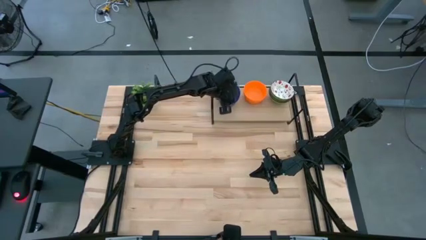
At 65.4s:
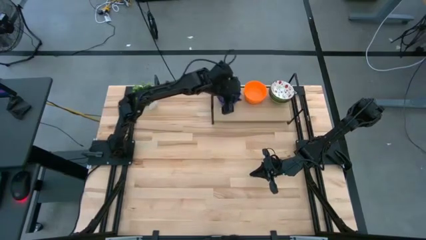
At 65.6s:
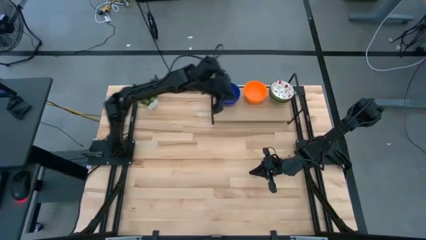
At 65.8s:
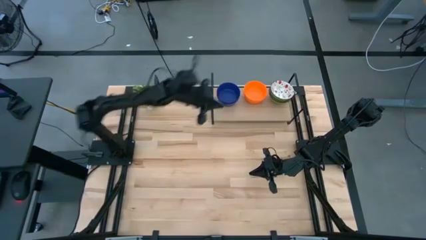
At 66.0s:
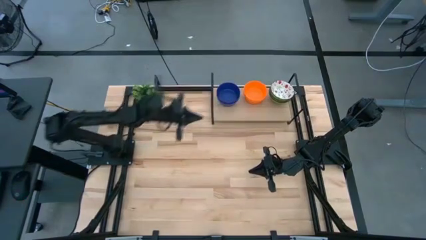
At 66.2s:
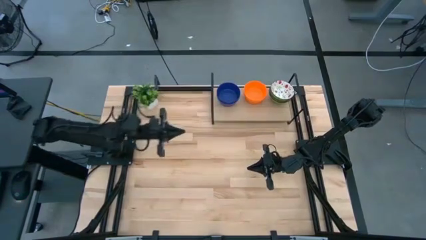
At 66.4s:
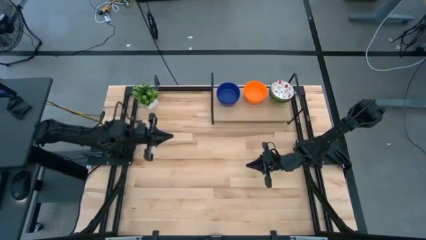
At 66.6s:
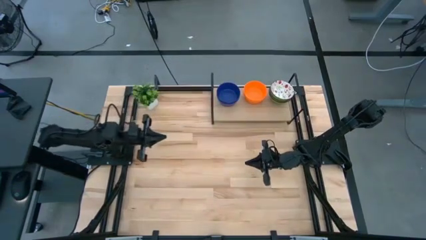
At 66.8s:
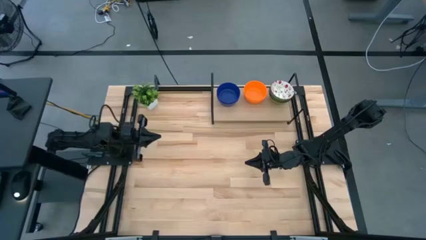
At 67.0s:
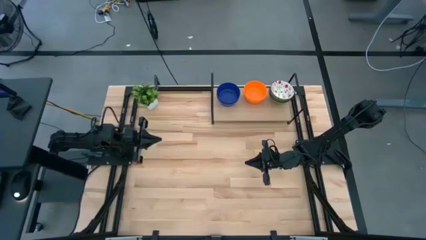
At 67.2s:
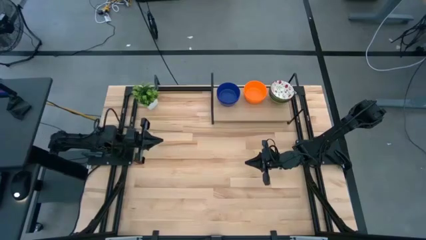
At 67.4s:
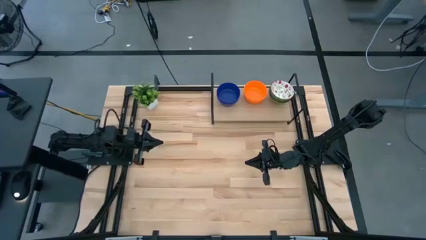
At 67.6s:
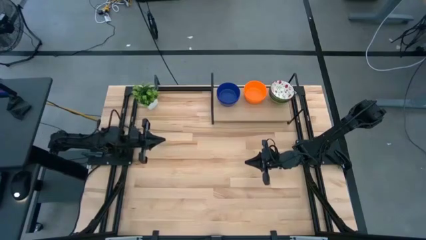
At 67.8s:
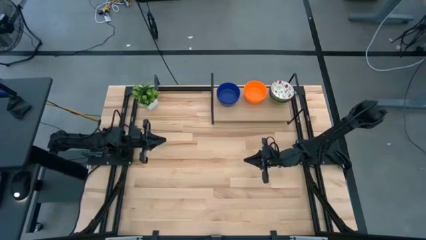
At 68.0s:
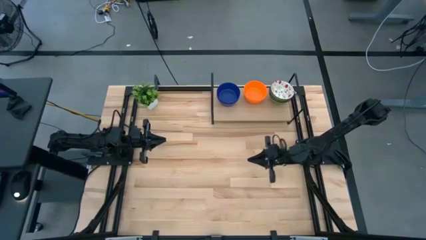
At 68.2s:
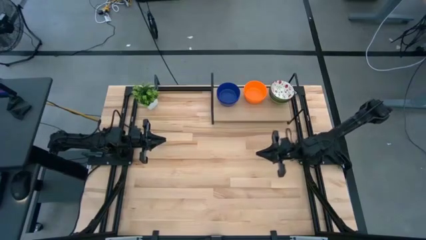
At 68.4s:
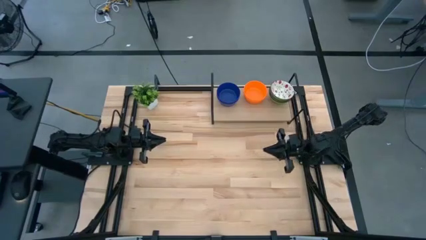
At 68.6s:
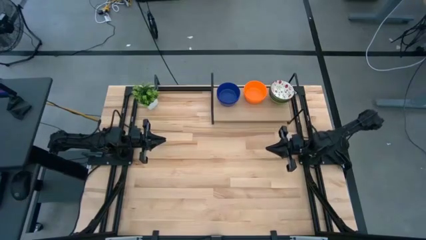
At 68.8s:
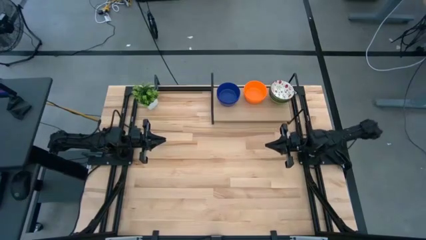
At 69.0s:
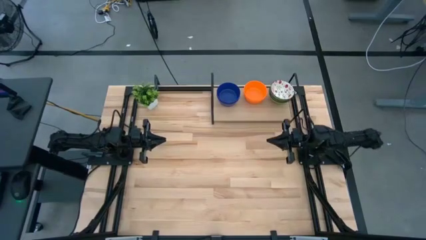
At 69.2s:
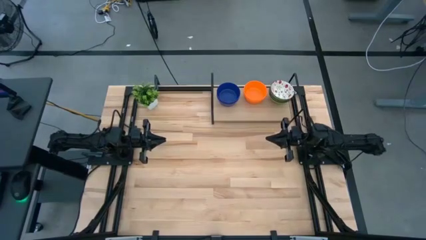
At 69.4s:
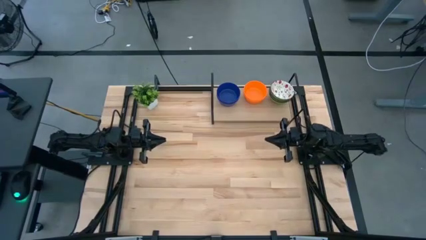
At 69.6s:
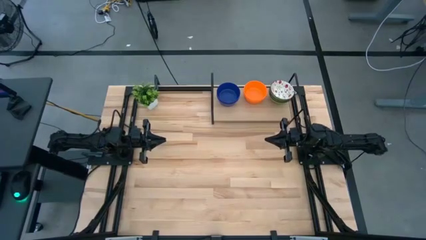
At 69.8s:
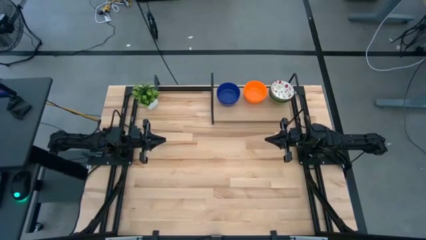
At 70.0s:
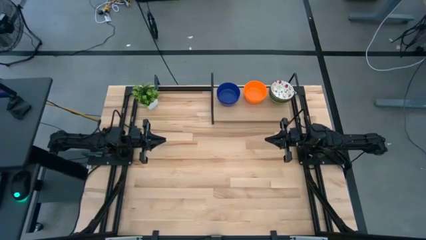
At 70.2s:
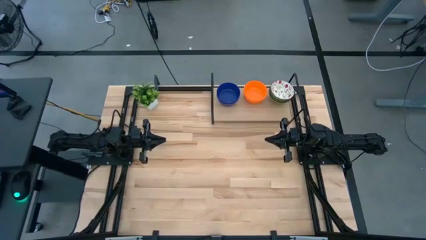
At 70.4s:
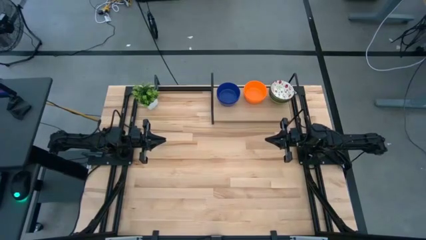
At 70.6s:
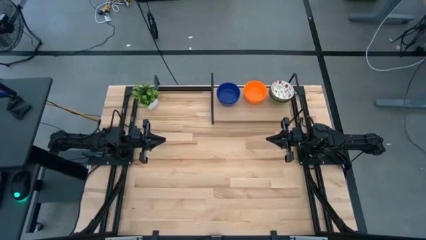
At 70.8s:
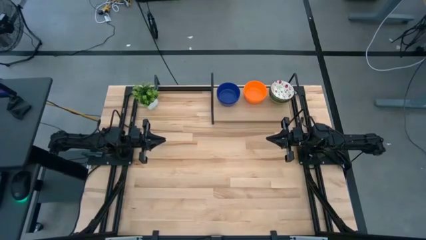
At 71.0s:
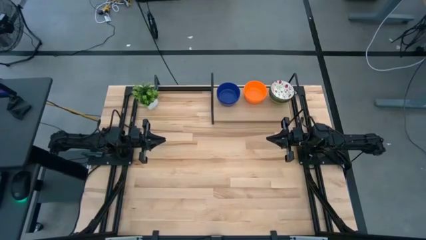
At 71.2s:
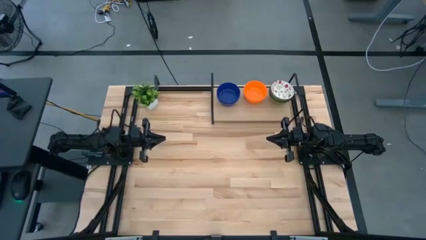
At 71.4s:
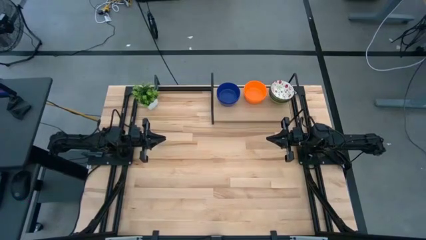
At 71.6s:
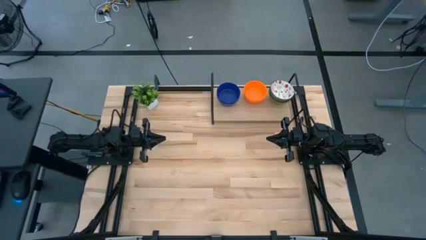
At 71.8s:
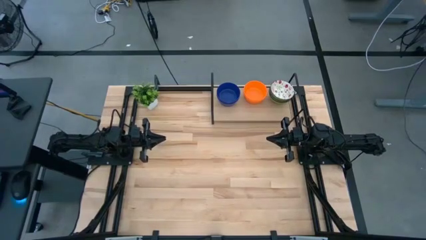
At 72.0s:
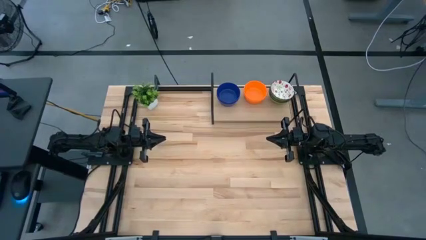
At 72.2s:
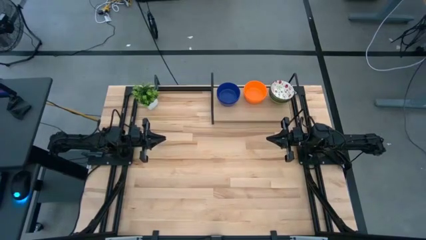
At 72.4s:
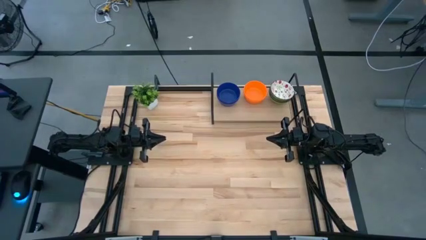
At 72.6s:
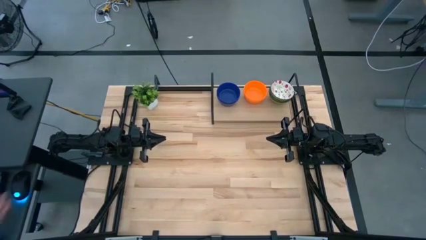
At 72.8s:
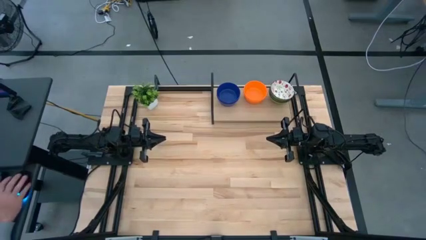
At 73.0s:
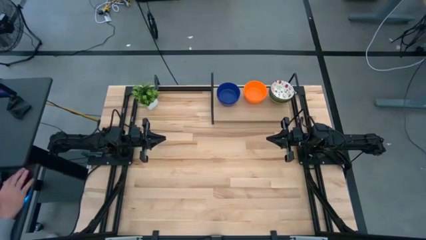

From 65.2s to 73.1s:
Task: Pick & Place Mini bowls
Return to Home Position

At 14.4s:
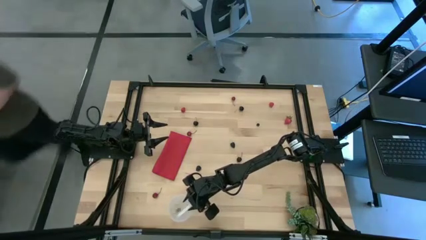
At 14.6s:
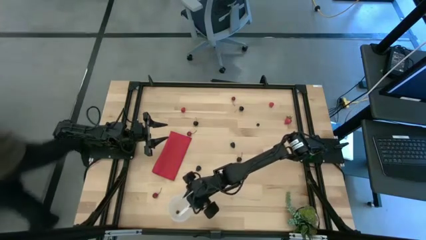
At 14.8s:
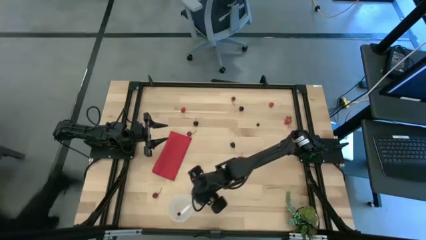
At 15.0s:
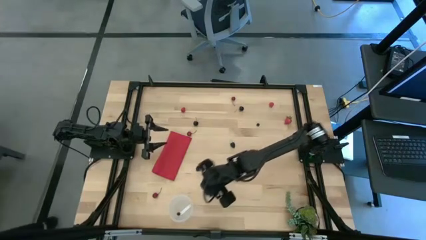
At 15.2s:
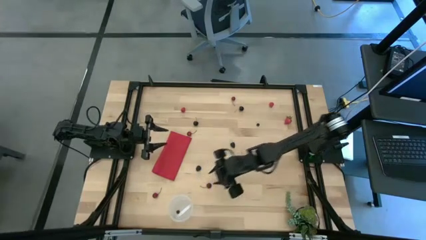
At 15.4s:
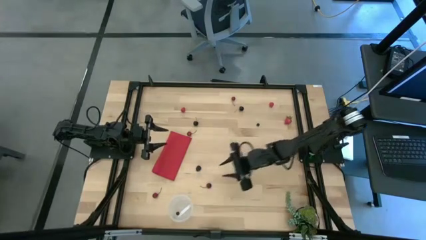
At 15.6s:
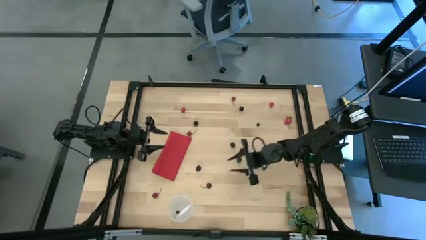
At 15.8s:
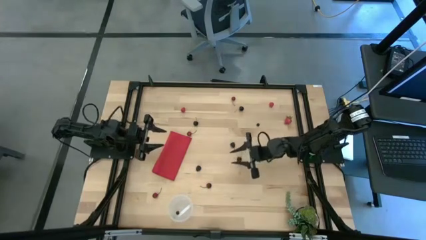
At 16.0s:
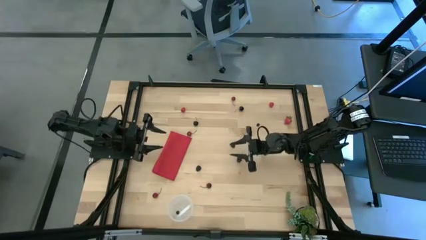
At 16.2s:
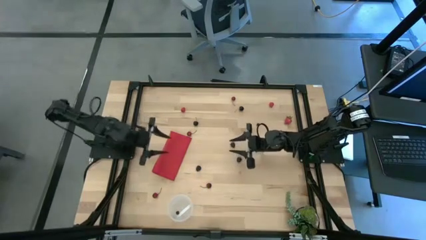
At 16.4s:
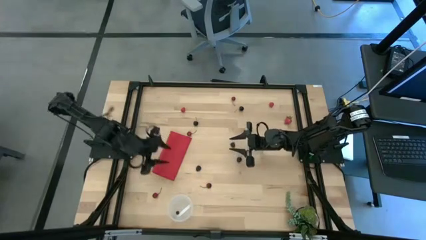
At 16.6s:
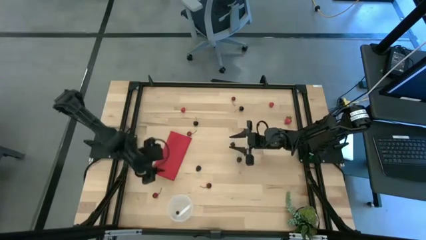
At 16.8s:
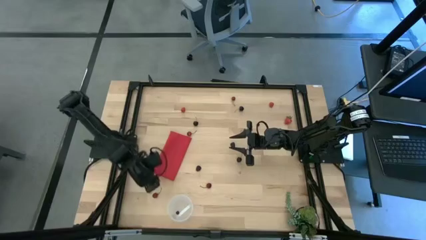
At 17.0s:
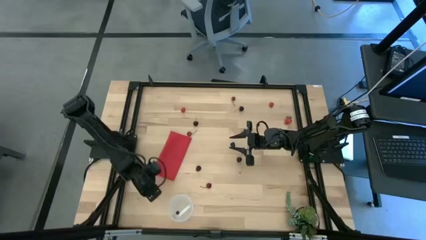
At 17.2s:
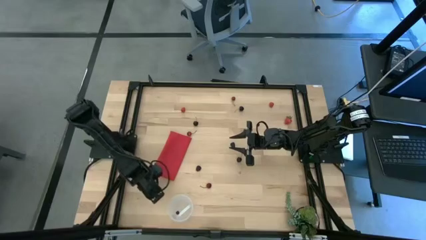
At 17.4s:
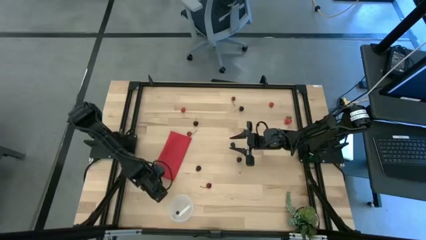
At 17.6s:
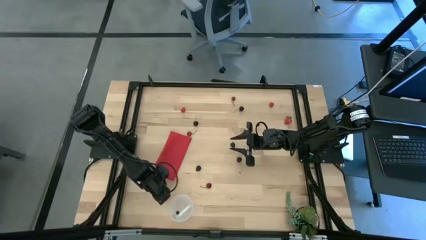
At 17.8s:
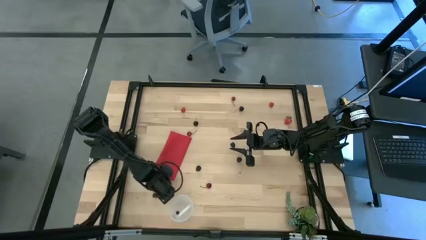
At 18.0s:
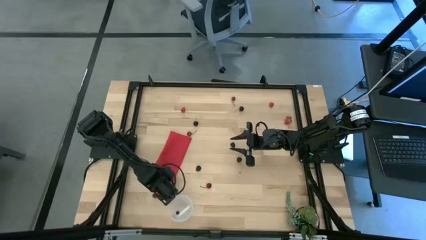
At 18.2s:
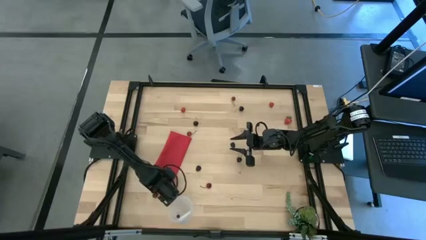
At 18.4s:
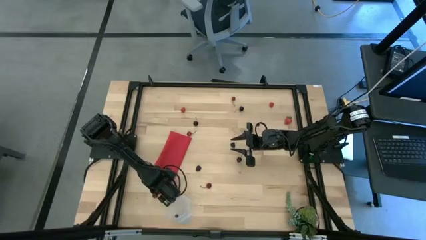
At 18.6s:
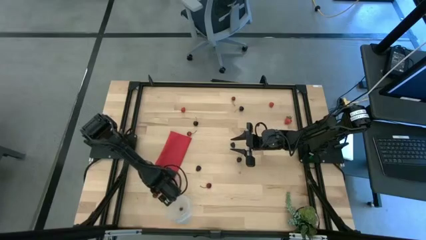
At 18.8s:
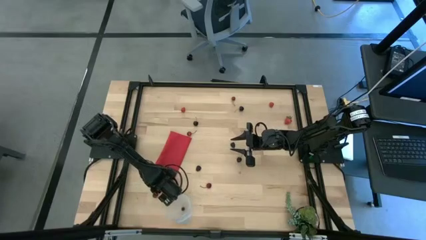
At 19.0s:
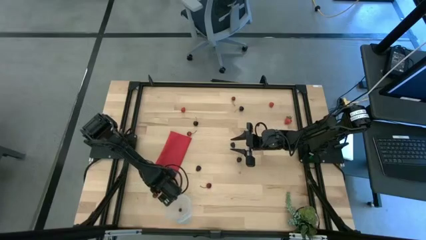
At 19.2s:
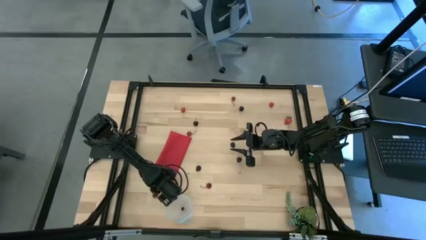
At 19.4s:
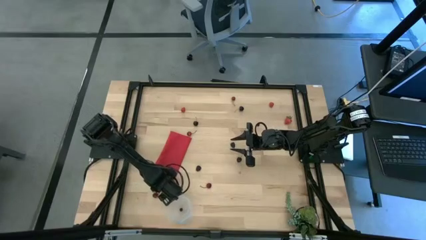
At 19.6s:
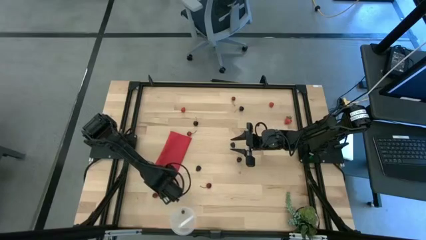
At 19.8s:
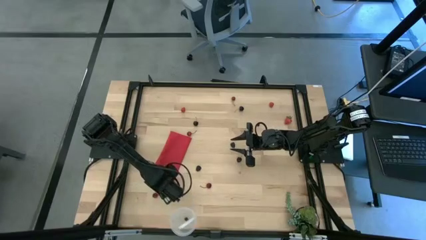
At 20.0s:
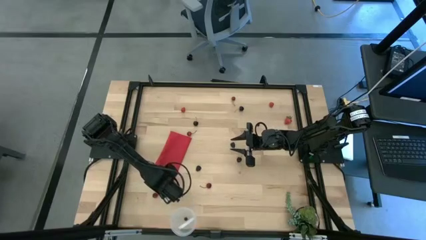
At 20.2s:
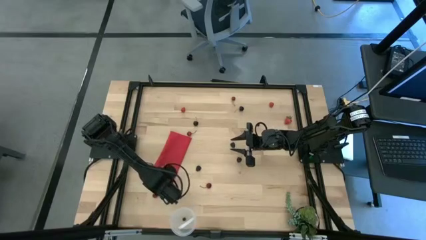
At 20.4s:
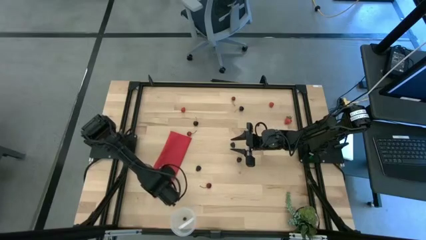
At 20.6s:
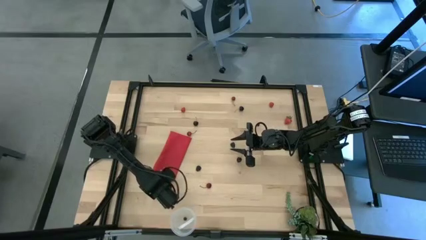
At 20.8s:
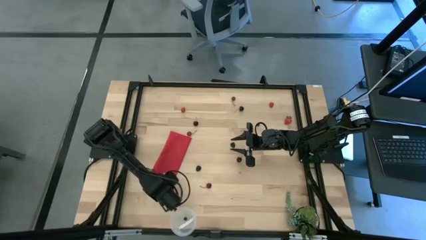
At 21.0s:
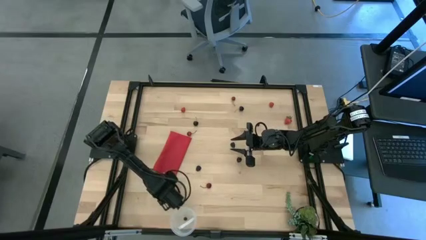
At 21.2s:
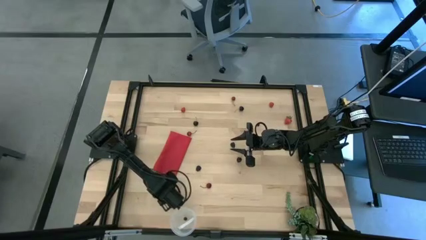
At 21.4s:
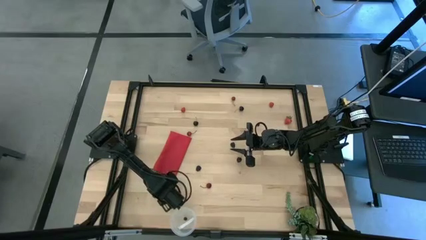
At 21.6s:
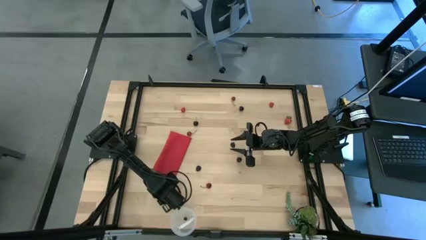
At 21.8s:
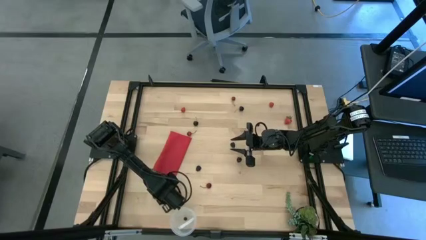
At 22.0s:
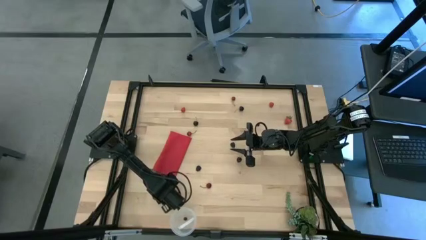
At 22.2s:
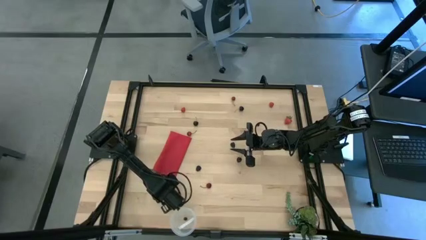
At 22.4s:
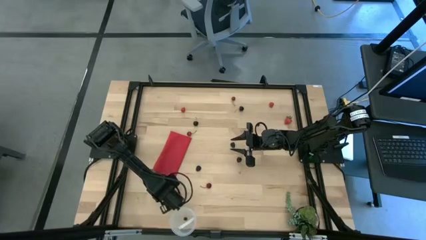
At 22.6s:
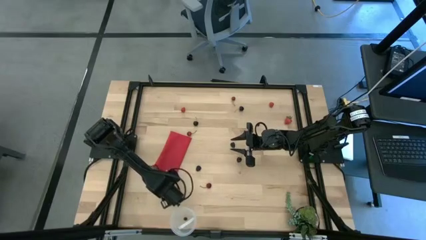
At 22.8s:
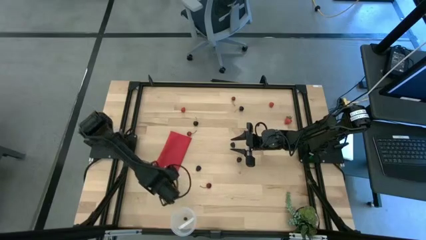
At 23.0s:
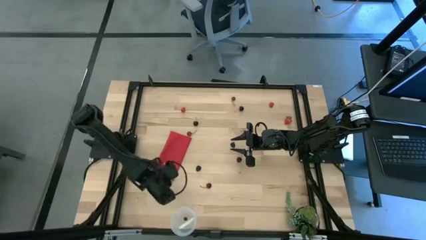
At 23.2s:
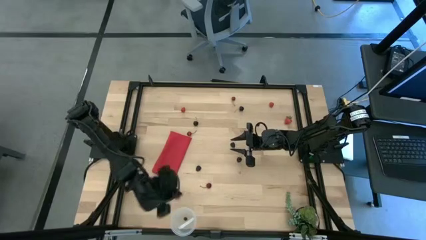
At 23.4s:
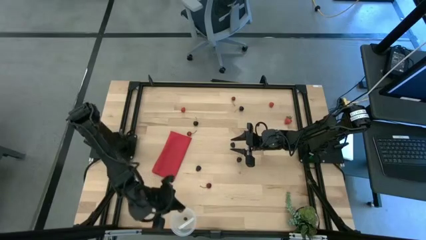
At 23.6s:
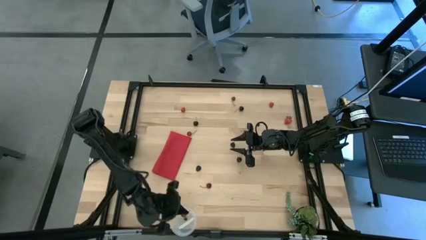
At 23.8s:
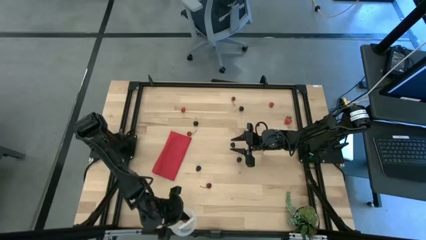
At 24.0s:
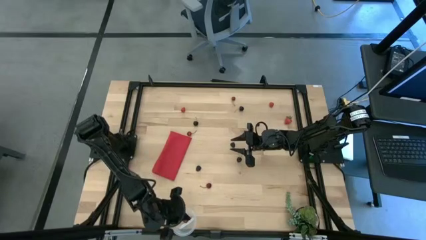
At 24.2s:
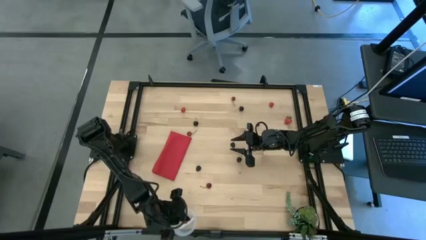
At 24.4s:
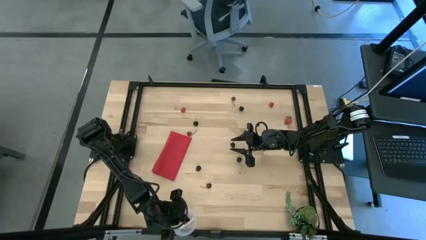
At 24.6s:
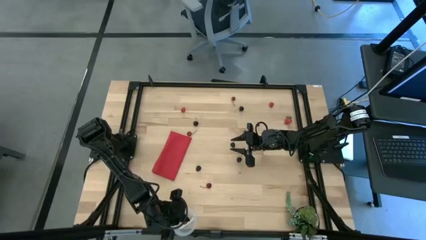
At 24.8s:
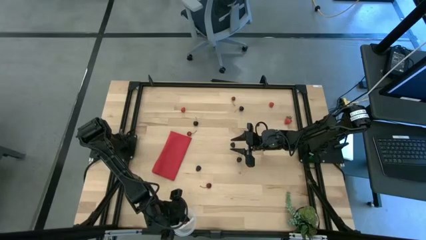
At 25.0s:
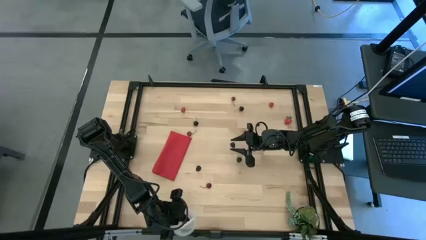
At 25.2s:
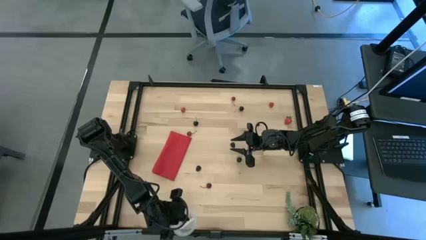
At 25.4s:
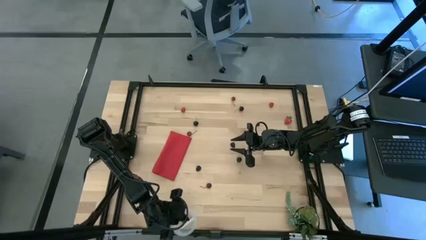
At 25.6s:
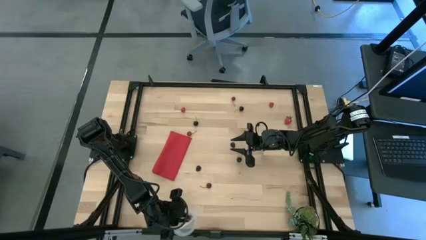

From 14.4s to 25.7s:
Task: Pick and placing Produce into tupperware
Put the red cherries into the transparent bin
